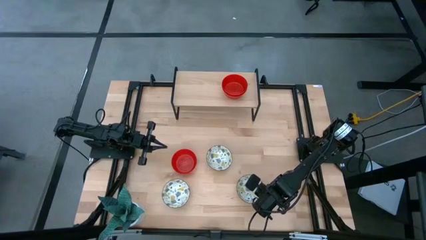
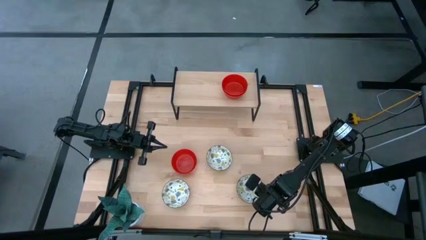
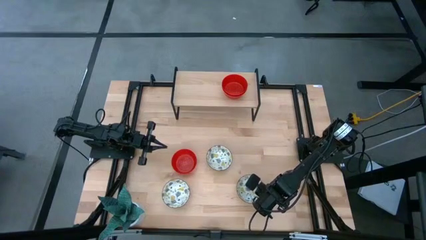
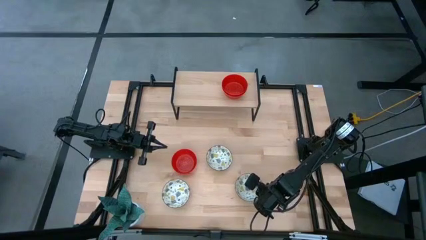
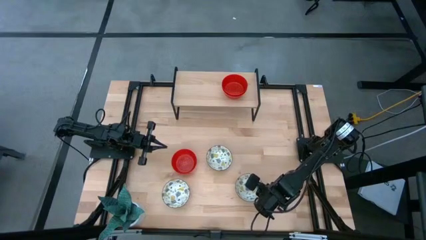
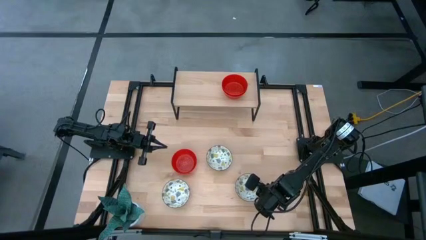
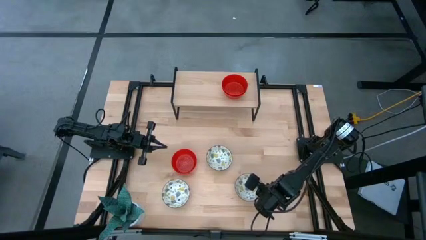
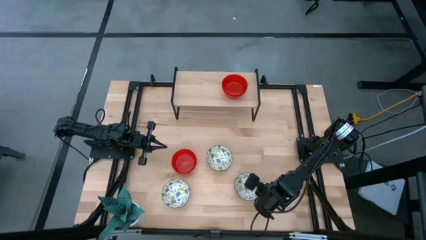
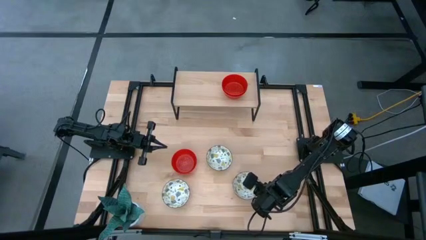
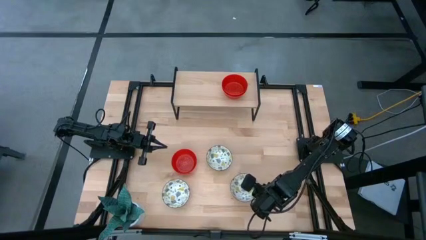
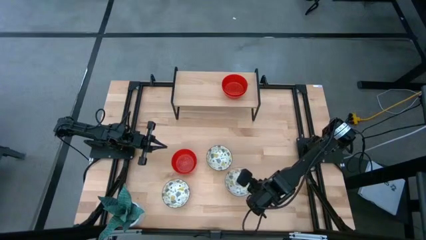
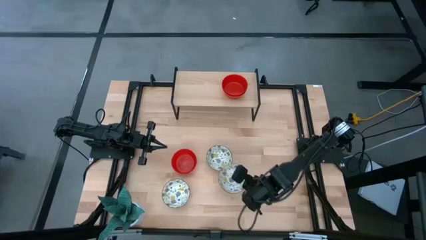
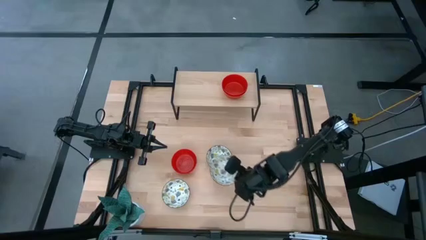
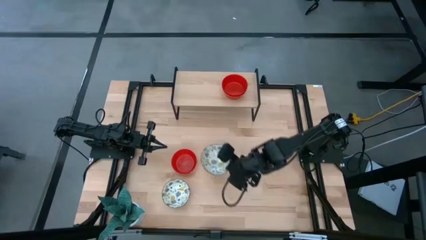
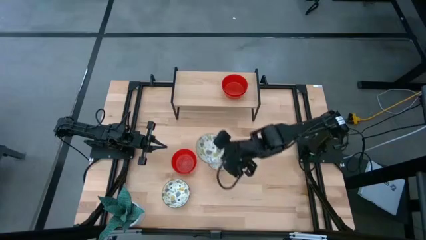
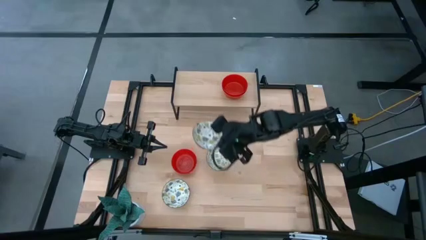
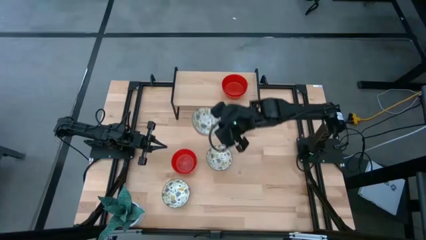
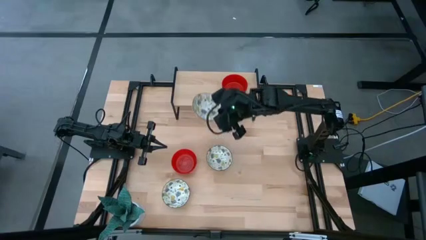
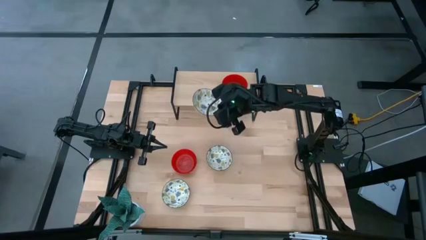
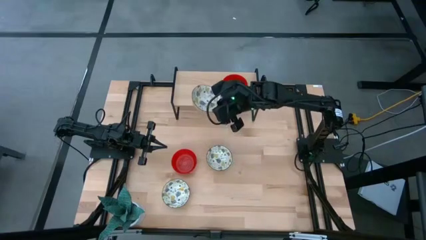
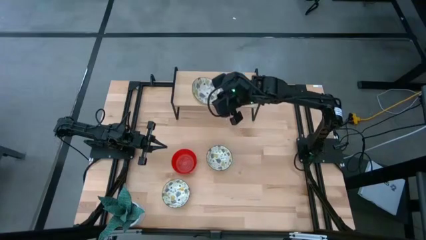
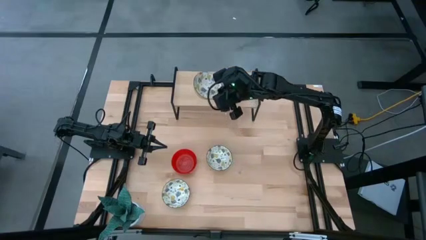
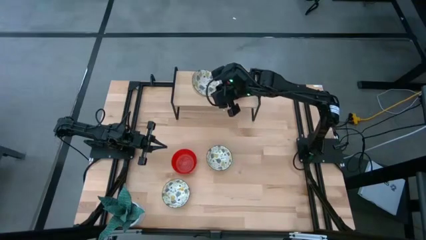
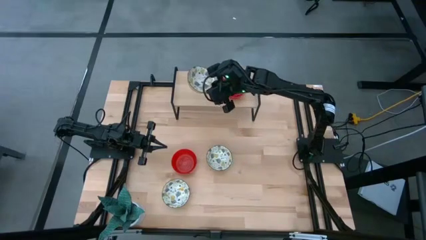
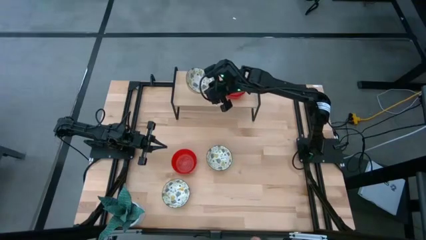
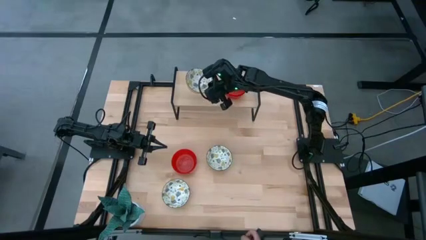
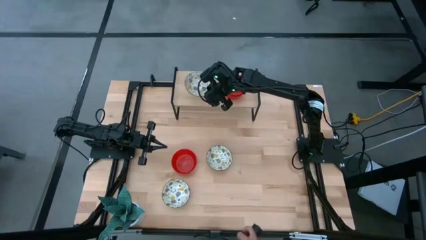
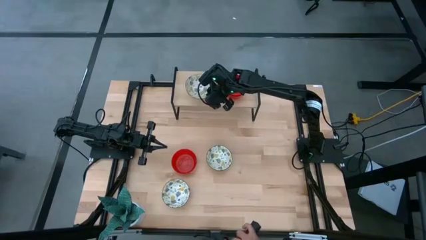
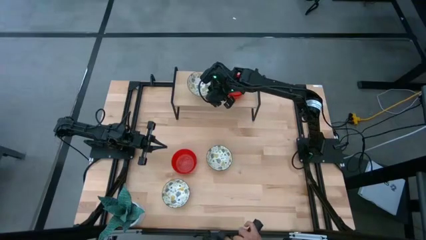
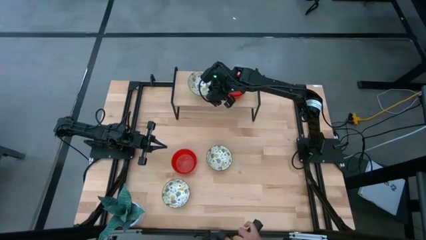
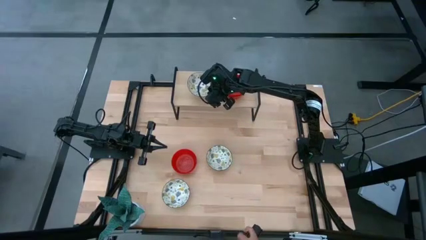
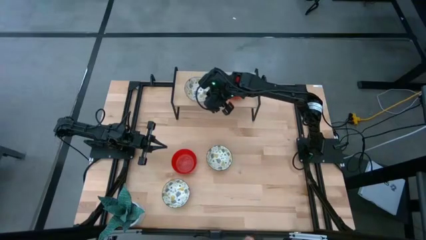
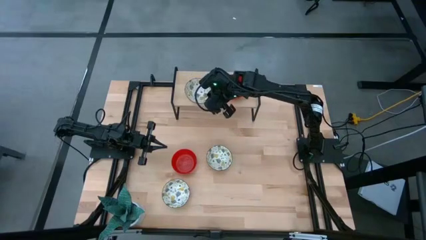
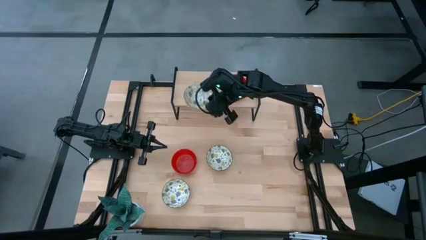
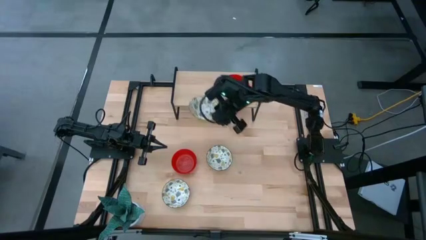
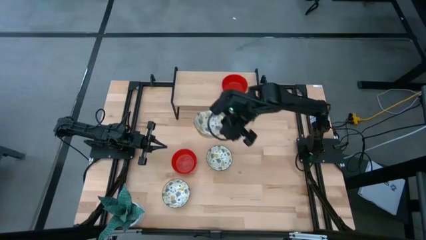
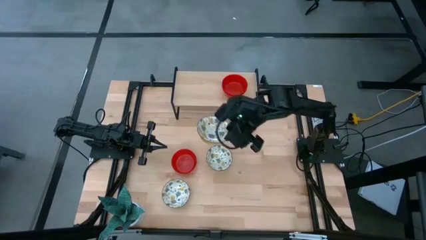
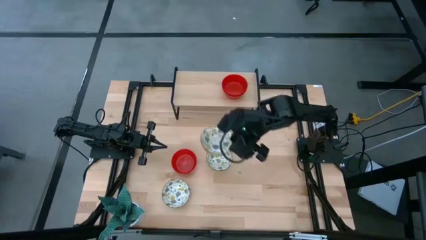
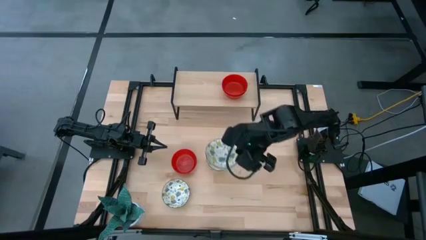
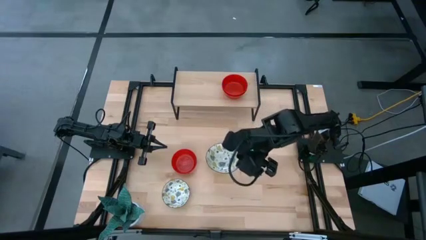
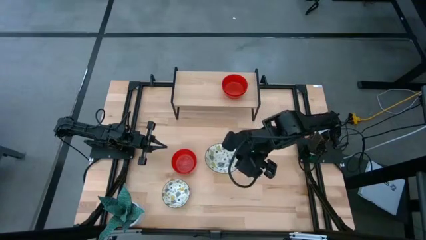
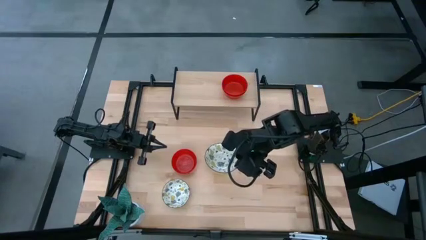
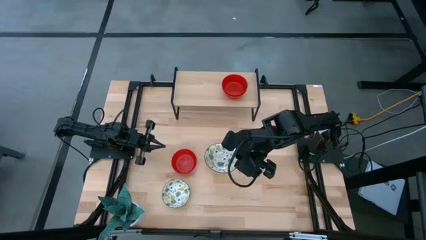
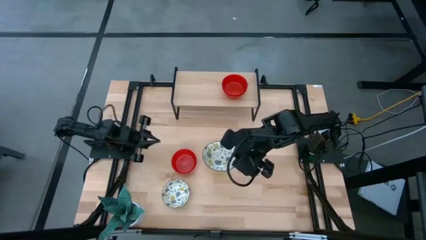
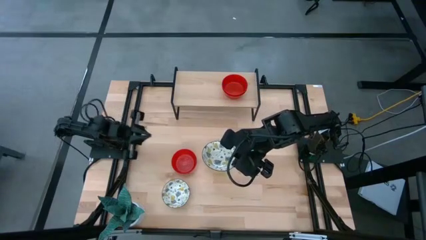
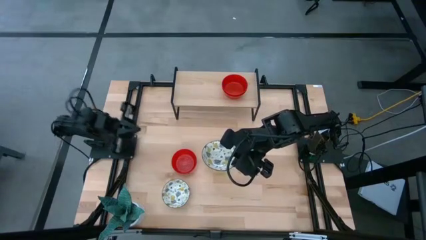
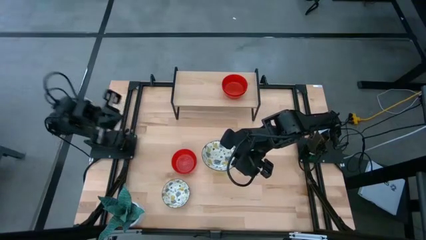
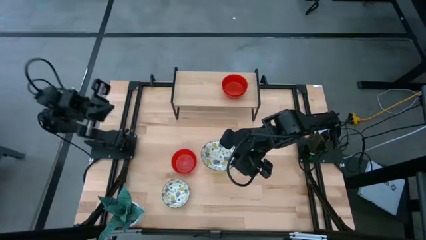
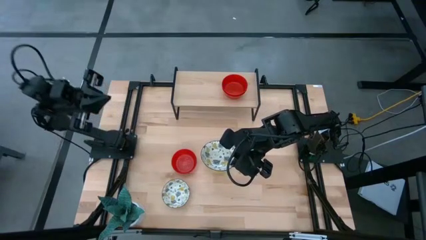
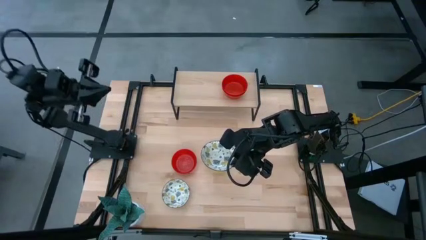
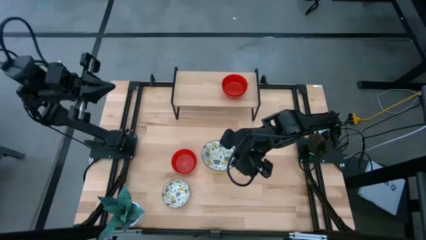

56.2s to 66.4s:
Task: Pick & Place Mini bowls
Put the right white patterned bowl on the shelf
